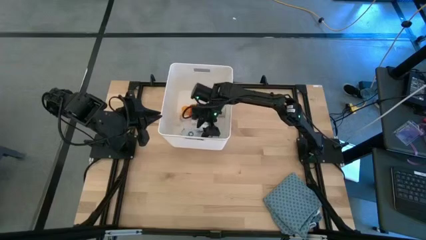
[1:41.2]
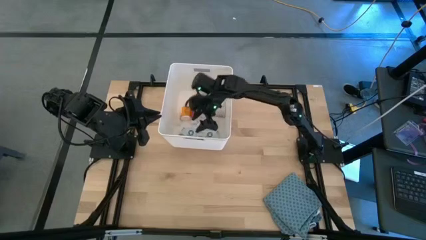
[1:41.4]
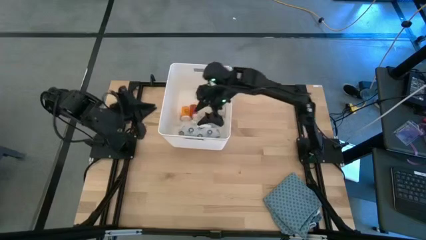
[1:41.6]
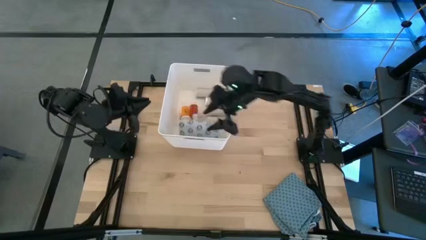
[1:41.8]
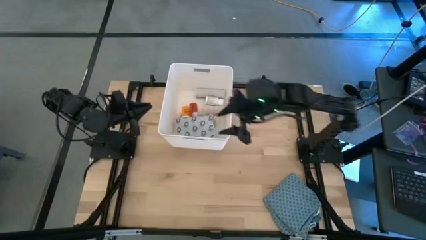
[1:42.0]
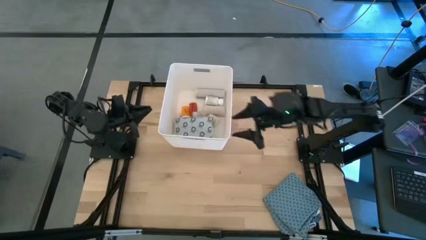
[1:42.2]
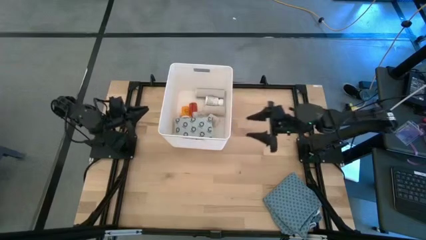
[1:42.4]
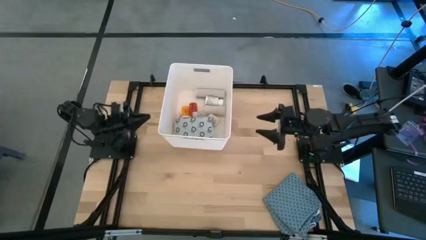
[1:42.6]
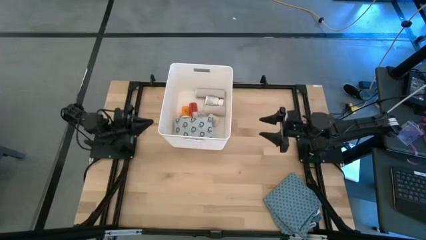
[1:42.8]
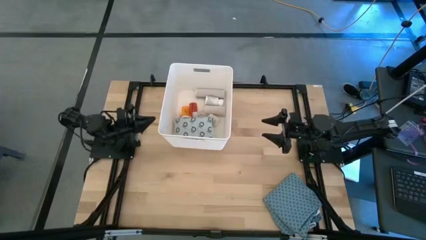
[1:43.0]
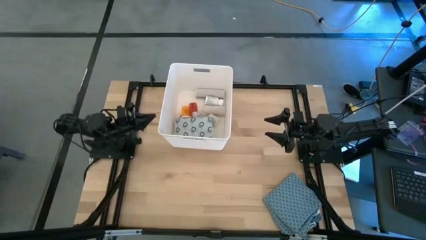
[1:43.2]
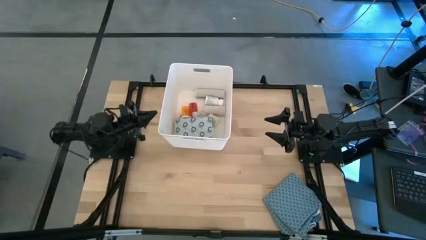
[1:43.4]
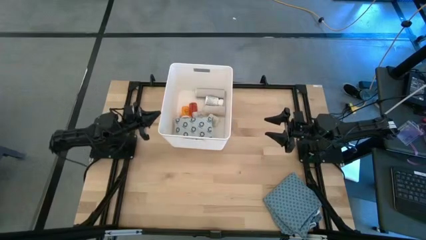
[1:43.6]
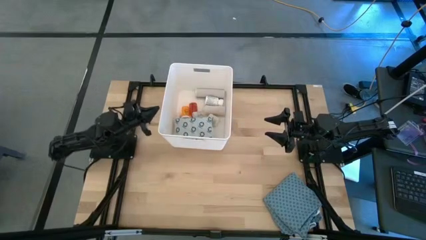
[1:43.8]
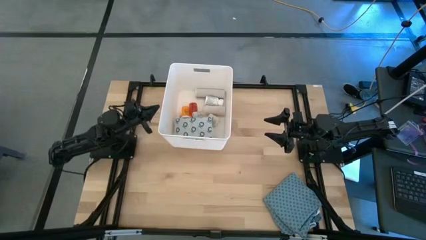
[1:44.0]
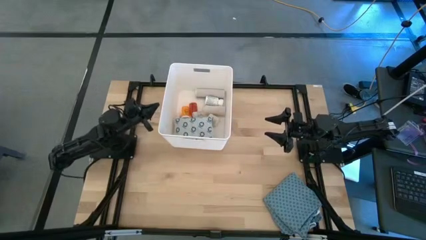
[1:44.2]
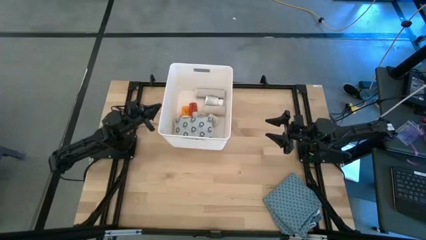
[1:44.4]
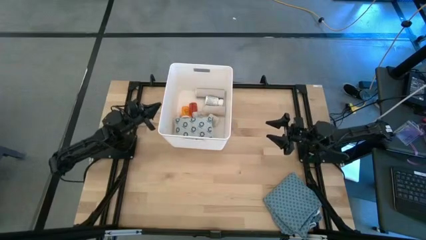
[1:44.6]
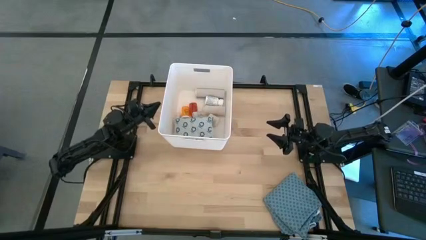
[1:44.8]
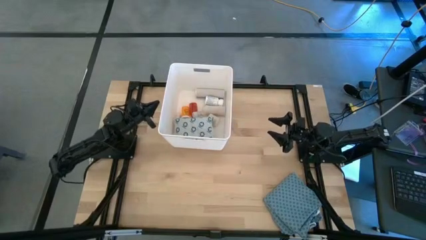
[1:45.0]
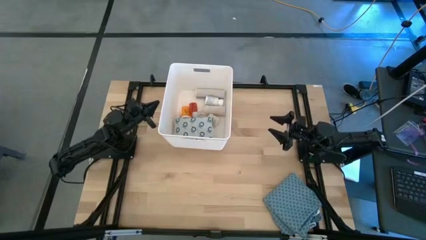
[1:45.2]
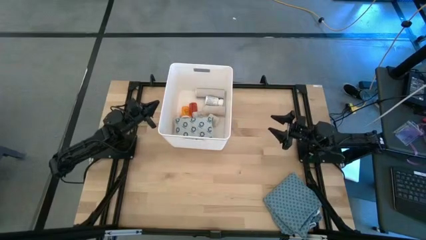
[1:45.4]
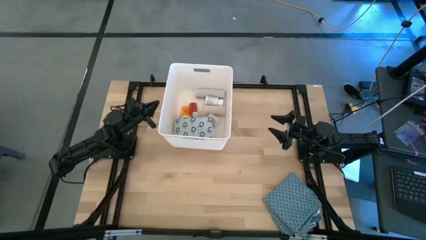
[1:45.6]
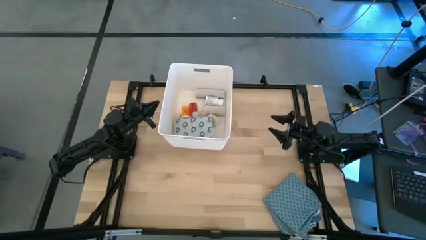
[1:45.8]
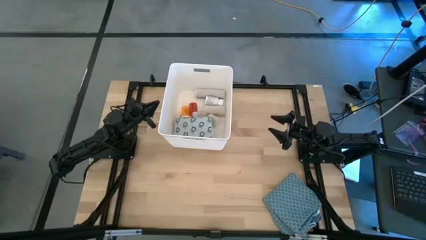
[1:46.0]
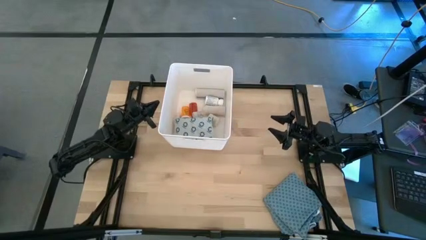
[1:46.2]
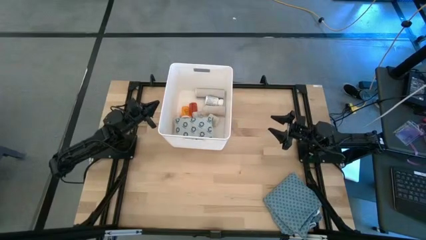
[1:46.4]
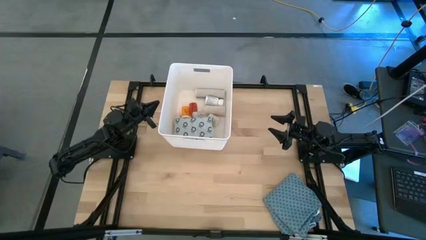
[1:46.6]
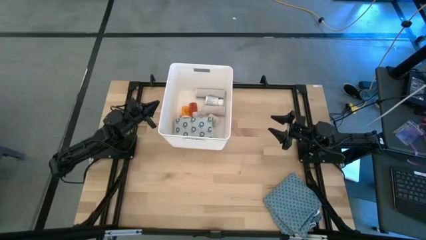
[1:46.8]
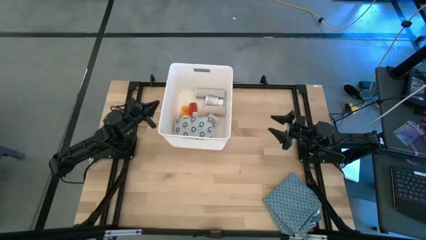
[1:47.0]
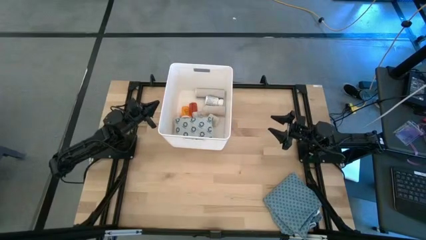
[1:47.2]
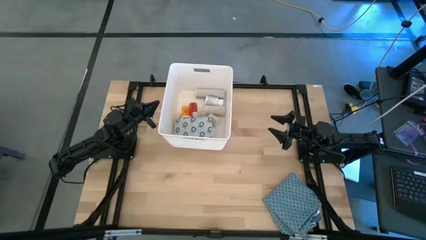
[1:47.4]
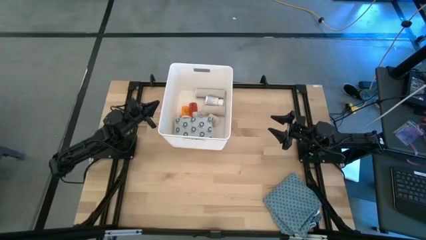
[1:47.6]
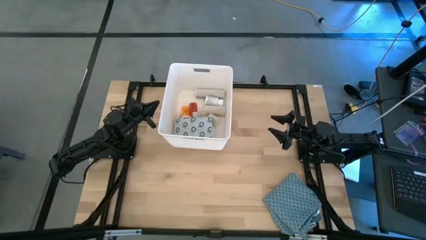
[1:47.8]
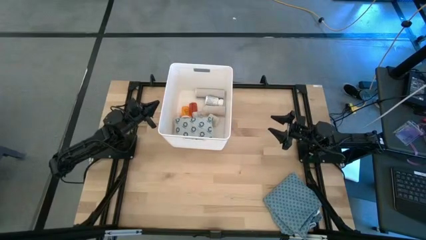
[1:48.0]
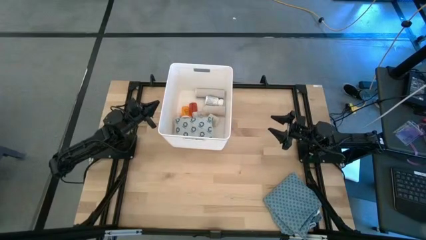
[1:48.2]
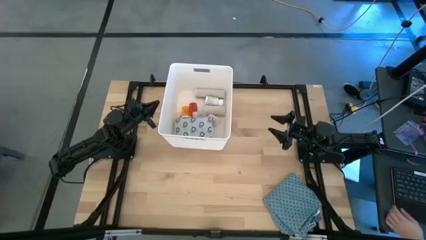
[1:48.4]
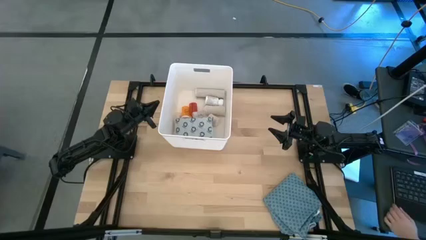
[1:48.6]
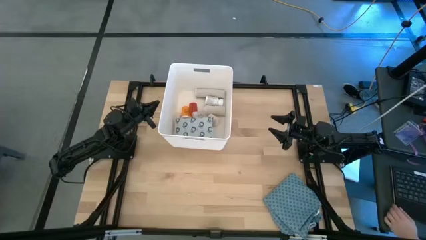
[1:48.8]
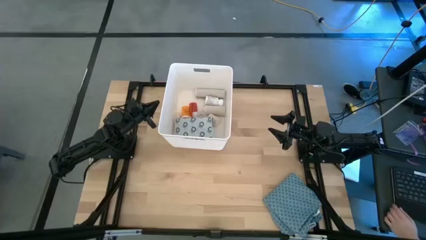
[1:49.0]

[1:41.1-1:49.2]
Task: Pick & place medical supplies in basket/bin
Return to Home Position

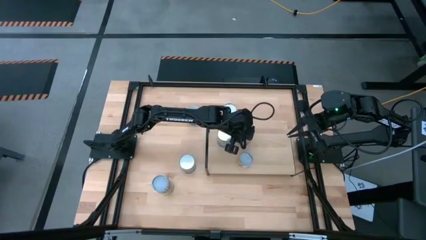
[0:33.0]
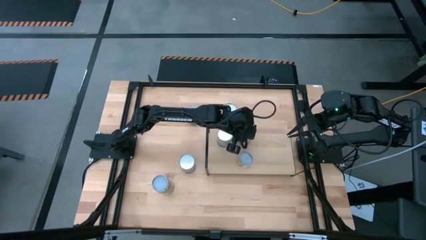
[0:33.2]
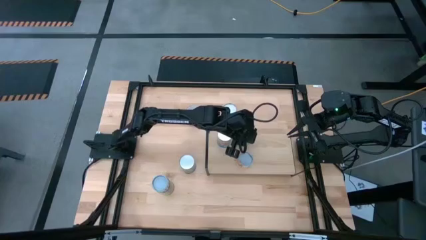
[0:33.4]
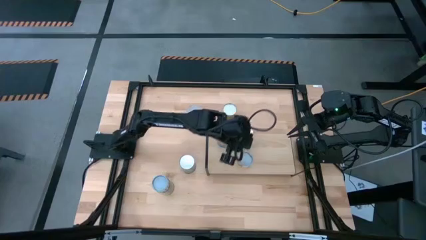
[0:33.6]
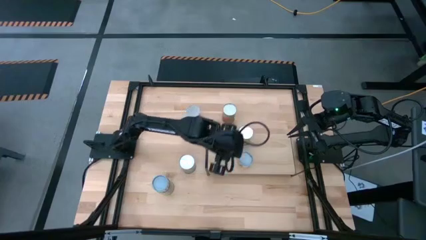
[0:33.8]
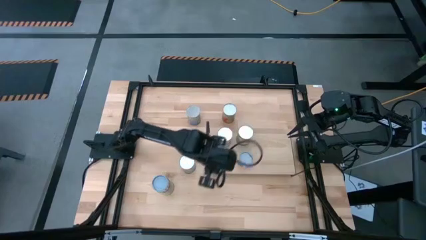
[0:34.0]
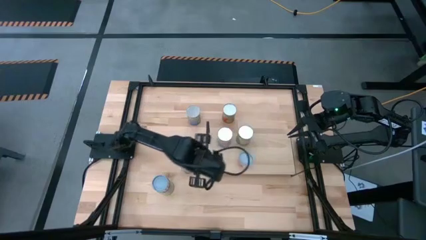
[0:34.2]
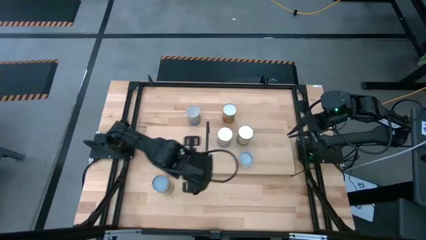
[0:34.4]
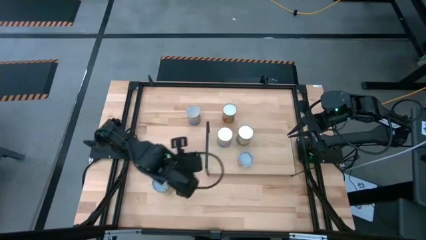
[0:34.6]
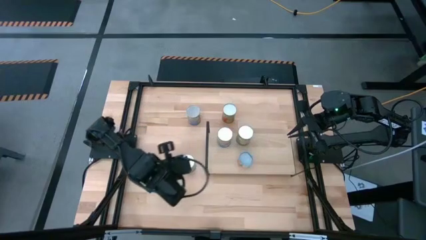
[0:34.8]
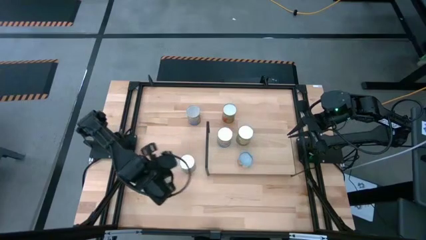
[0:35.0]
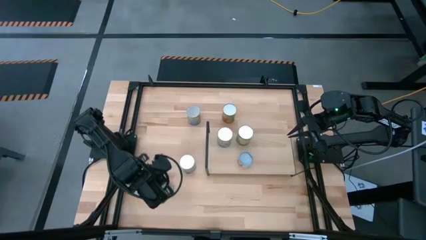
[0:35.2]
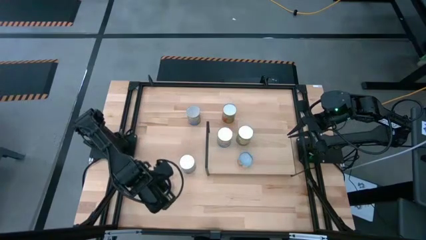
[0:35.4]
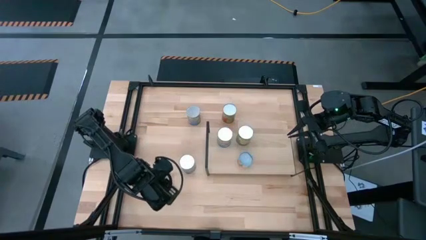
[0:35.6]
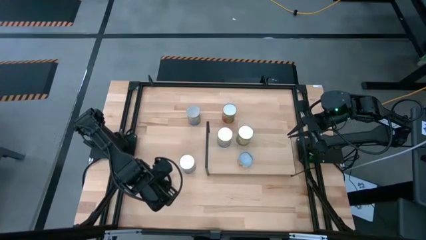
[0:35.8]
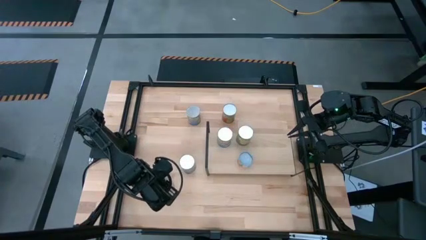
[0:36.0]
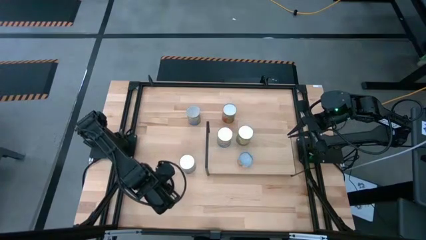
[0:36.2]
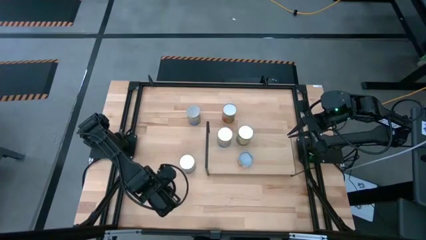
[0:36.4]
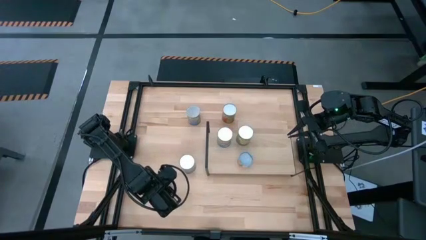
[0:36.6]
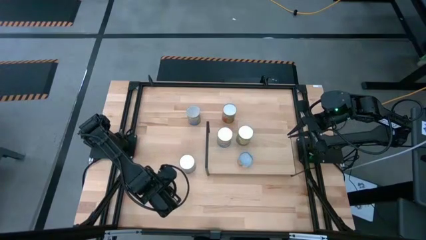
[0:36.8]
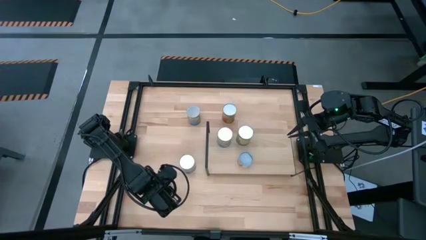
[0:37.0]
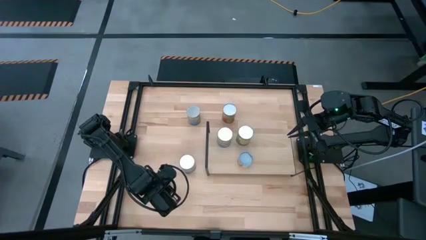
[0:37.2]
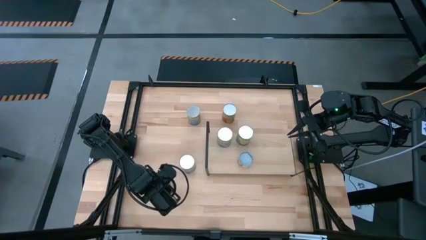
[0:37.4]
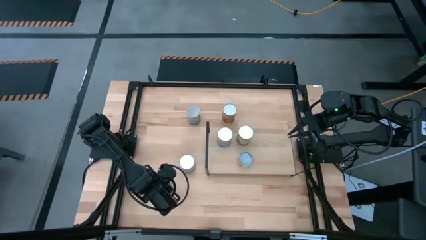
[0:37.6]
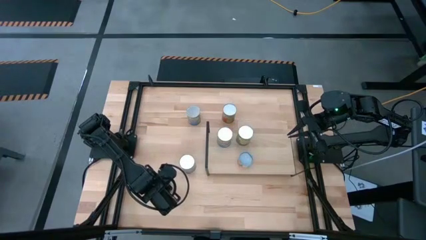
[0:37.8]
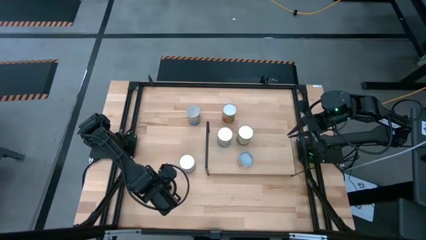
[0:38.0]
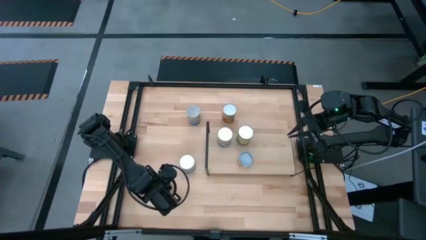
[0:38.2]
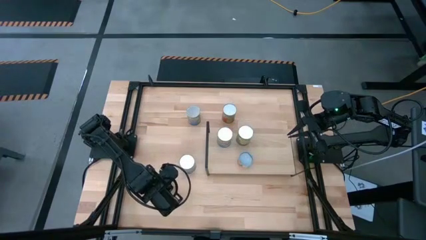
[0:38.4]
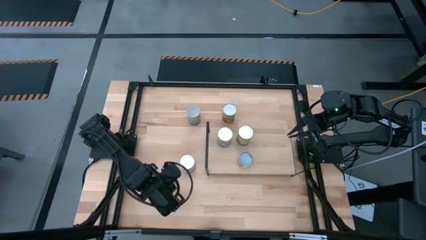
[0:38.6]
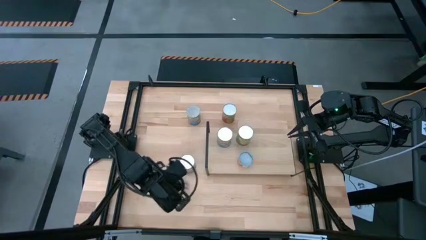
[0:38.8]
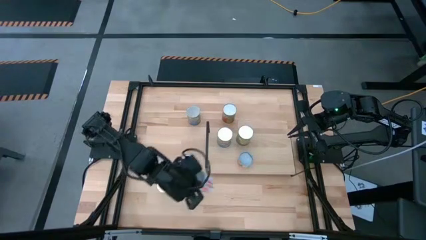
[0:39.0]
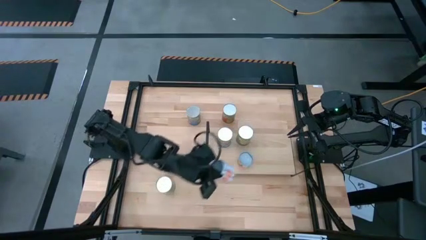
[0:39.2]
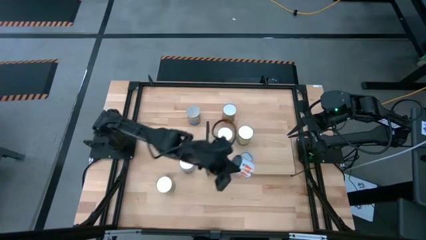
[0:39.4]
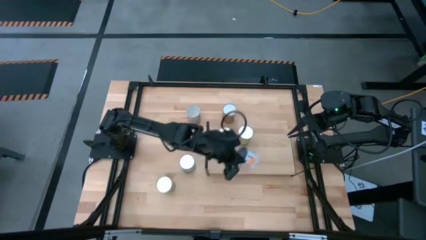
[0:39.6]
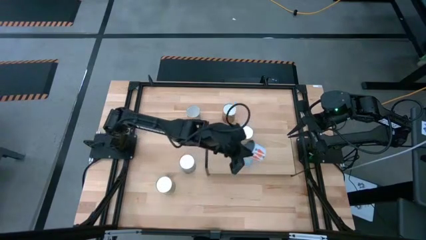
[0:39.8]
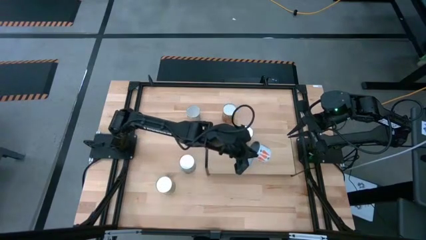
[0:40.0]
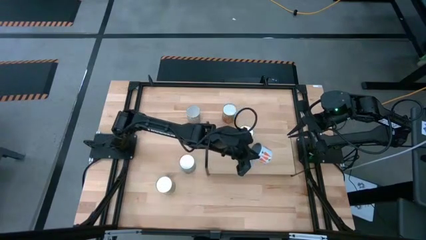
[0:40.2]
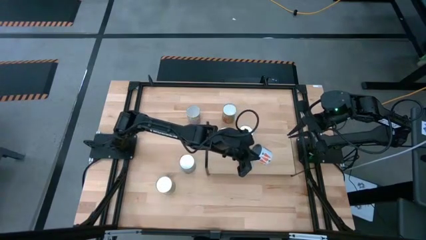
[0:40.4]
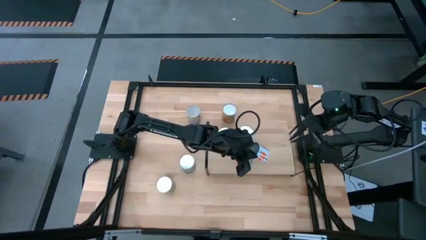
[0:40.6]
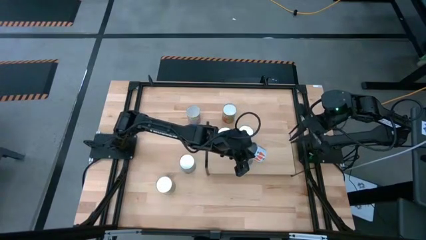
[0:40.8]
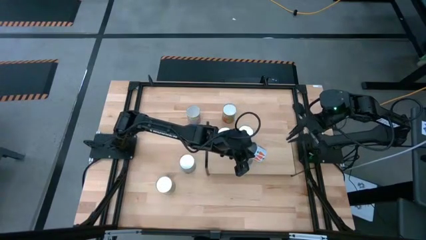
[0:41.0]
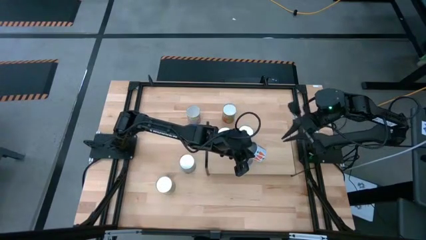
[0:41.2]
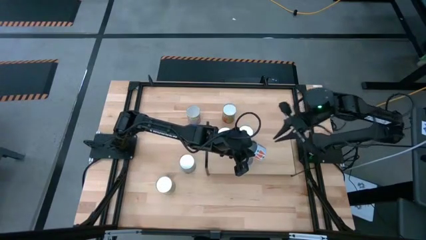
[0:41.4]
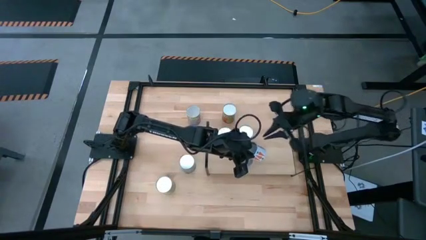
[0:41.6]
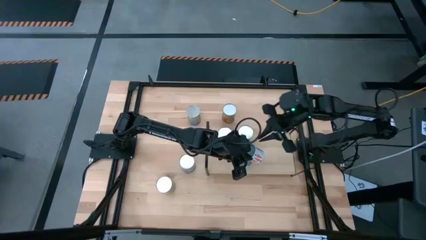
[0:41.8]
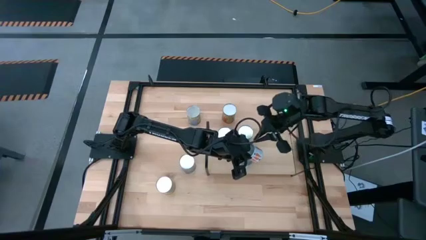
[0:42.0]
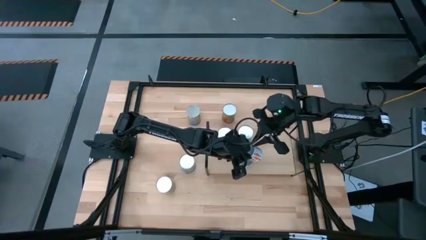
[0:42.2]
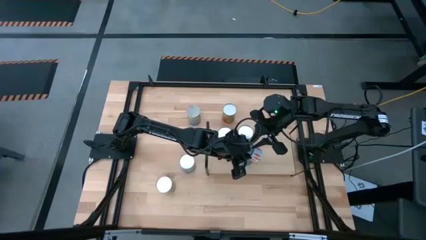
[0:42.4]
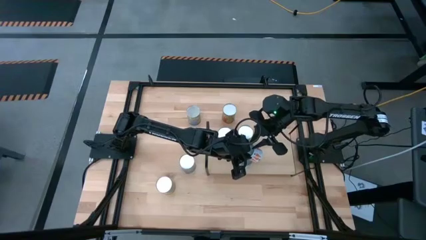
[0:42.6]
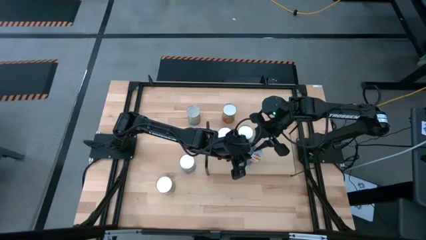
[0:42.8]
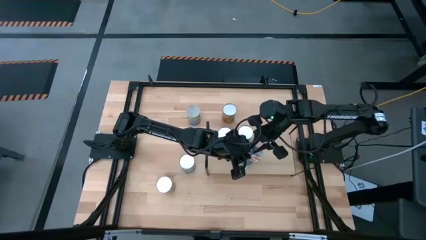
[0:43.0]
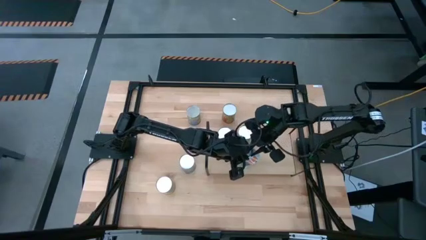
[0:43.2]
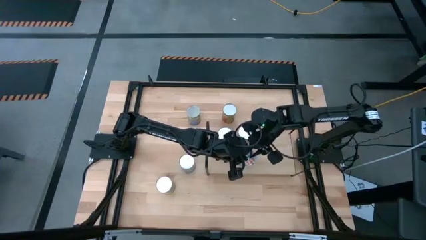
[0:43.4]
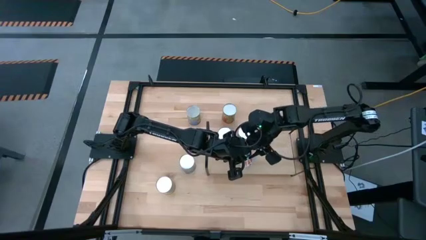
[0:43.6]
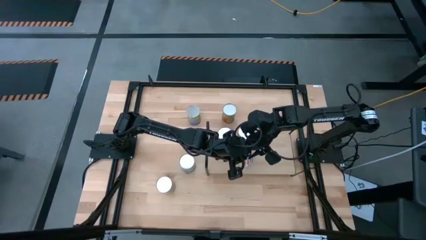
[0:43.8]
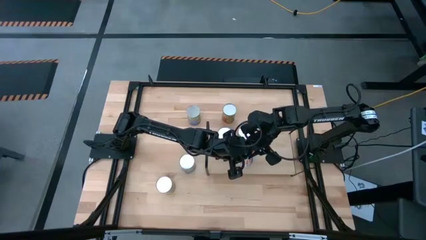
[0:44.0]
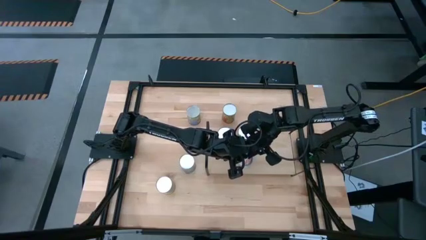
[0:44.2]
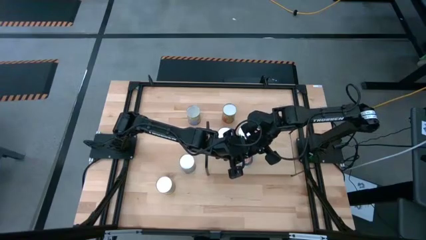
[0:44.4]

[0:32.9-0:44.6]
Task: Pick and place cans onto a shelf
Put the canned sliced carrots on the shelf
